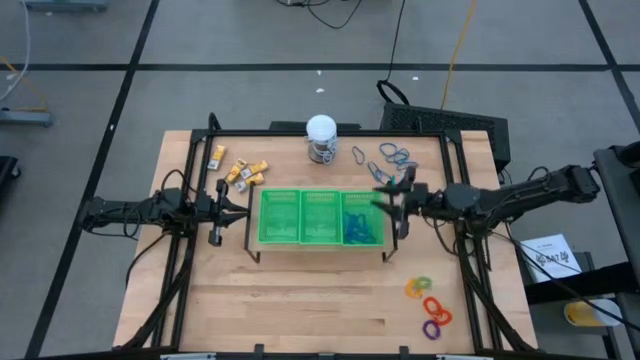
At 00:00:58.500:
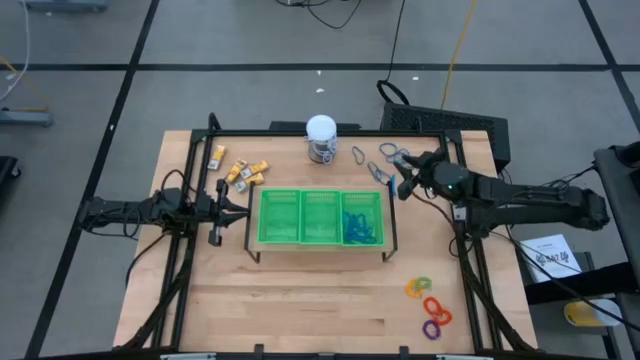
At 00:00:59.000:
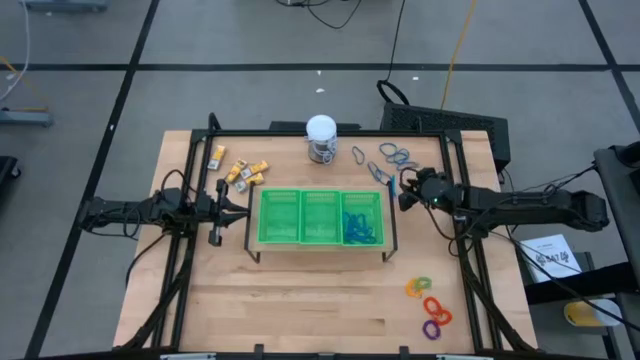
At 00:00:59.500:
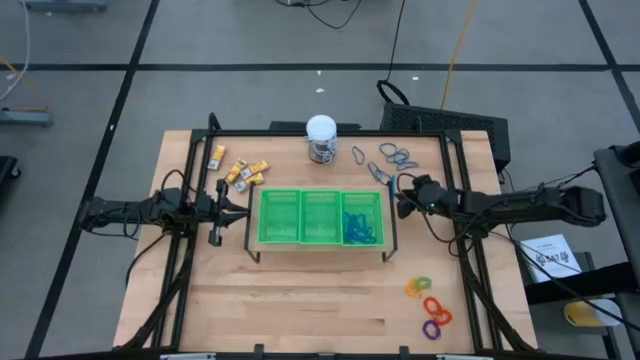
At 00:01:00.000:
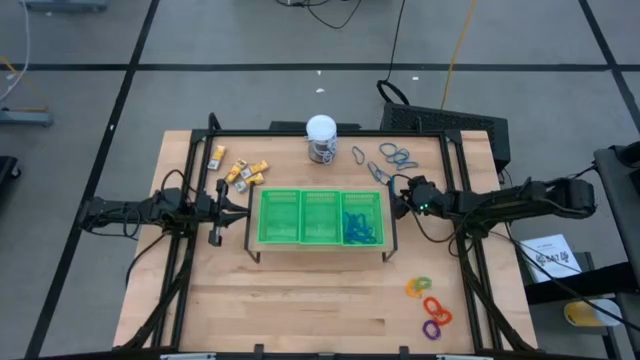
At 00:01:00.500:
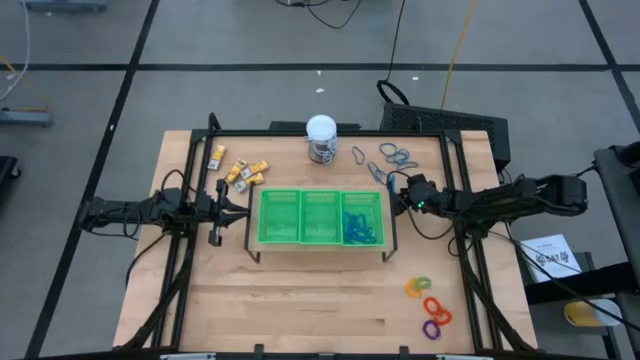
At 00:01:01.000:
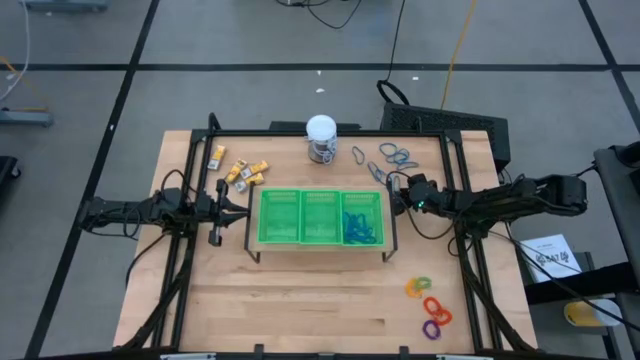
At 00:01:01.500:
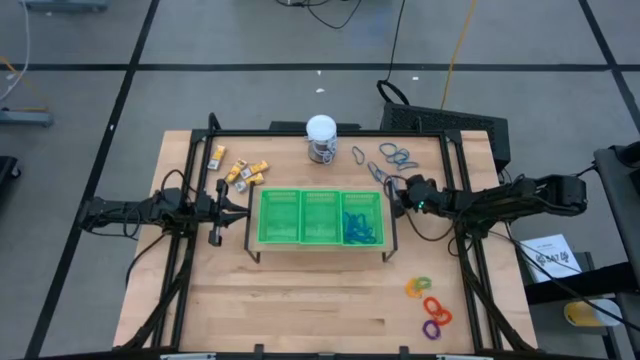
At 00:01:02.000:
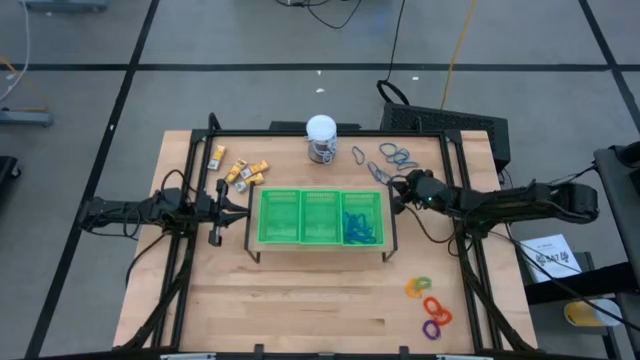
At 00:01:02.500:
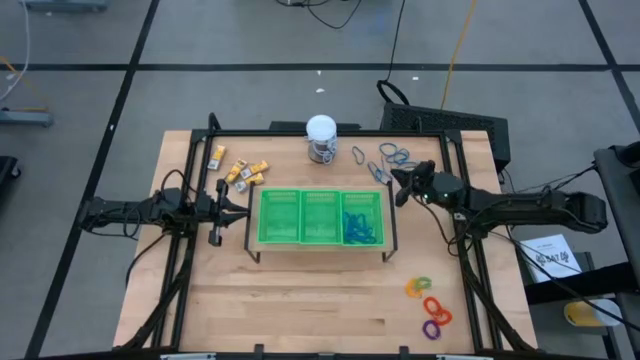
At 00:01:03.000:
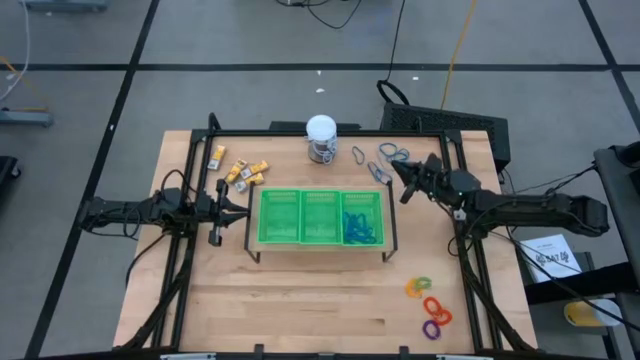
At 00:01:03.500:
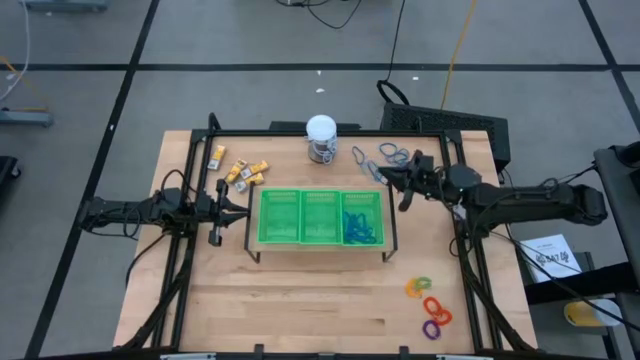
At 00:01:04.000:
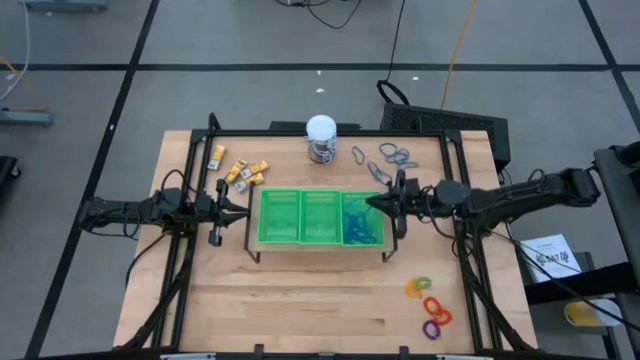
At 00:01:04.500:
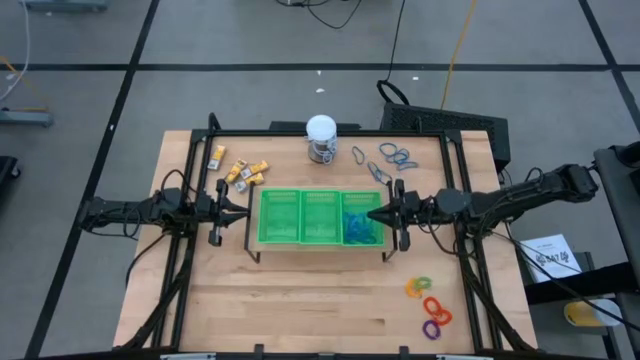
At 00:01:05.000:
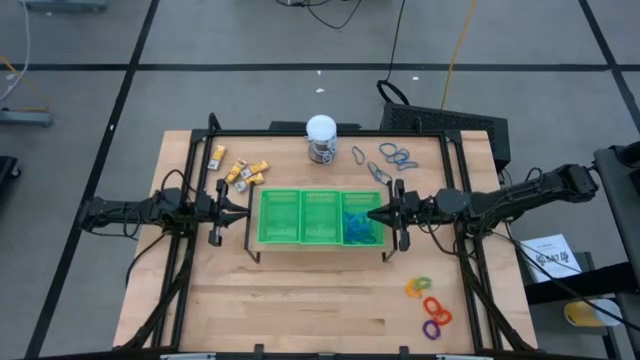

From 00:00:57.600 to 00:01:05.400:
Task: Pick & Place Office Desk Supplies
Put the blue rubber band into the right green bin on the shelf

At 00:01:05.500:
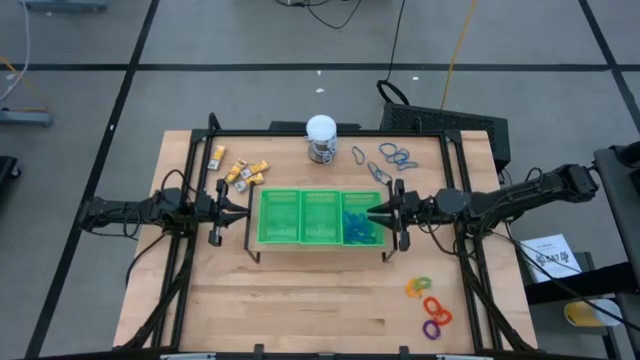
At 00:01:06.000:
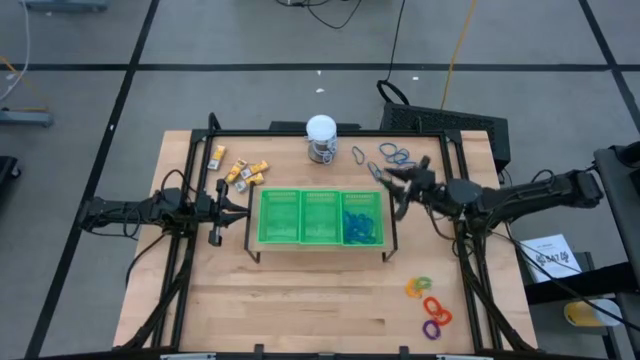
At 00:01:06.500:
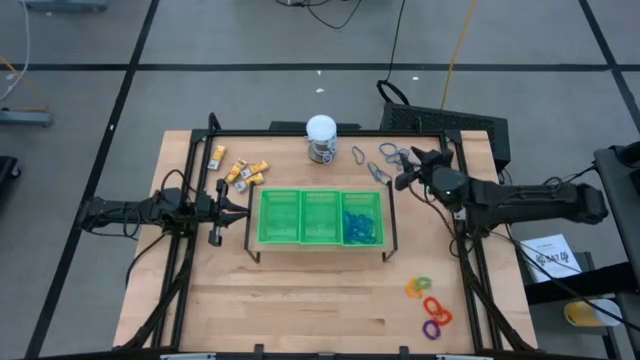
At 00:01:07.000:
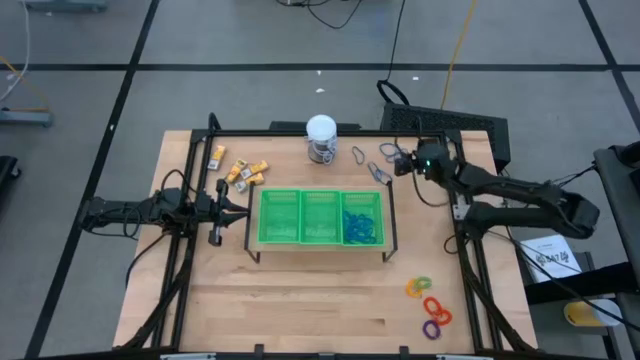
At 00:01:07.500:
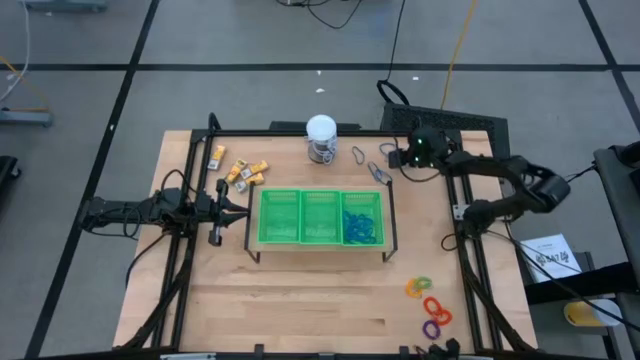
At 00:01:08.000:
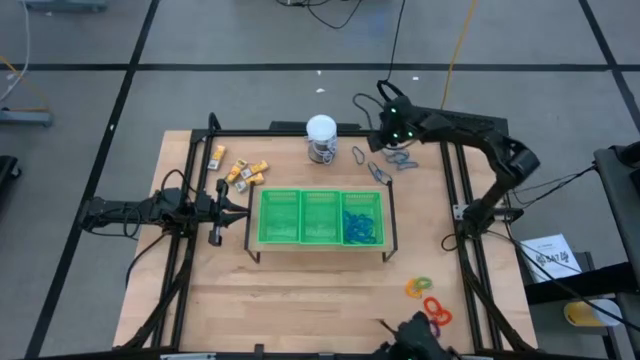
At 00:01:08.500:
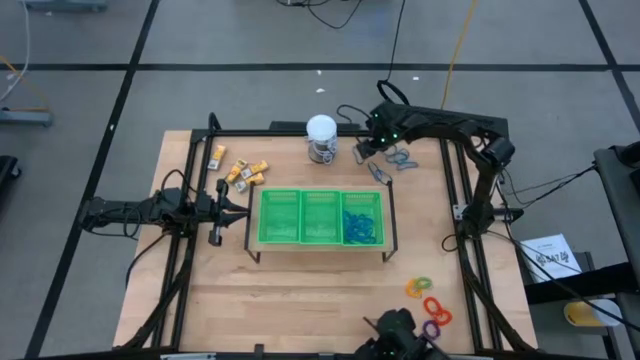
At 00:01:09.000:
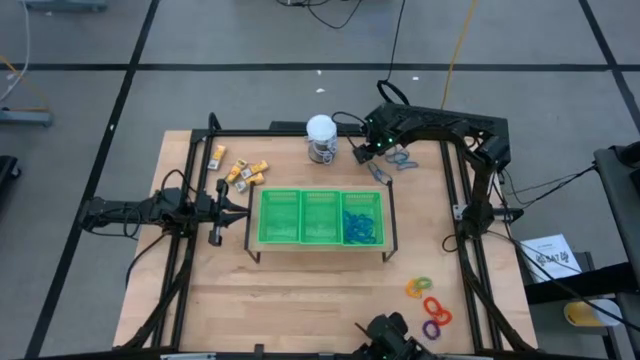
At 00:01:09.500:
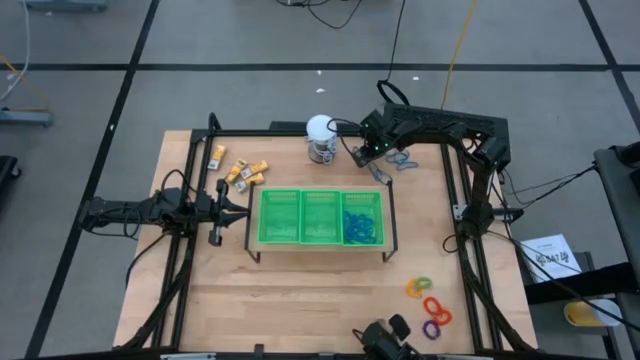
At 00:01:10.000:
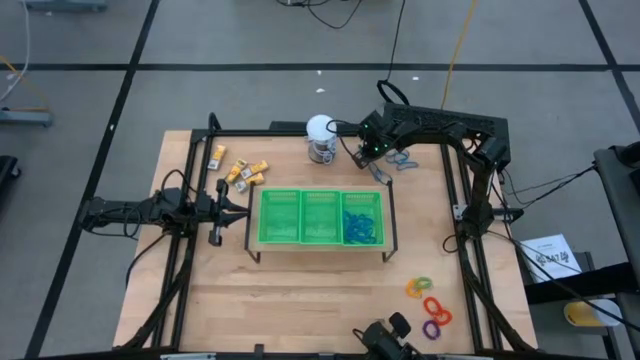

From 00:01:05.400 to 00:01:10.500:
Put the blue rubber band into the right green bin on the shelf

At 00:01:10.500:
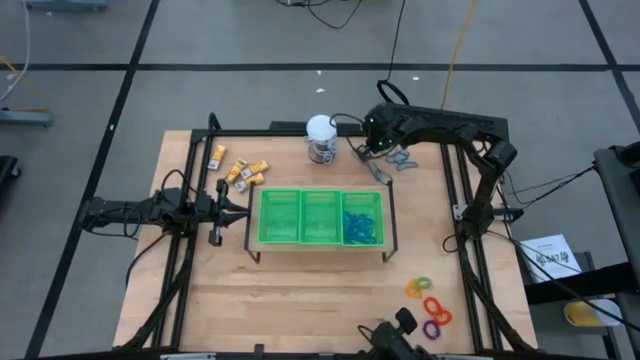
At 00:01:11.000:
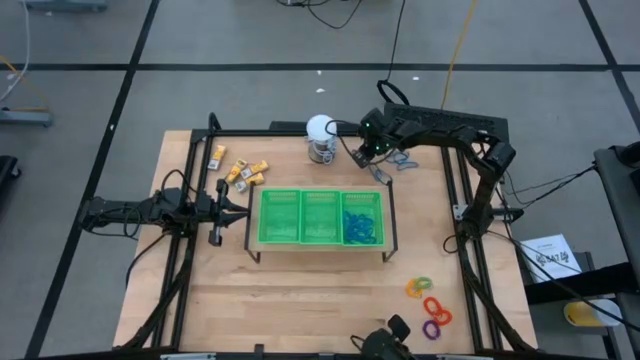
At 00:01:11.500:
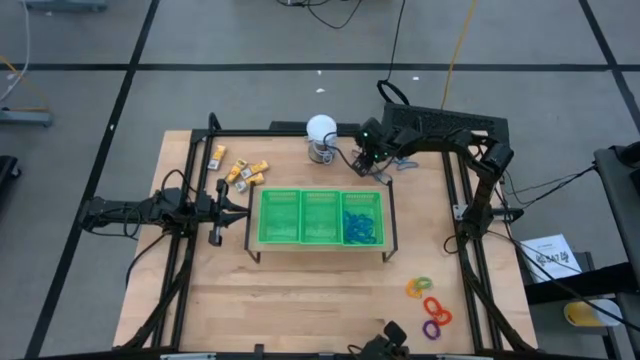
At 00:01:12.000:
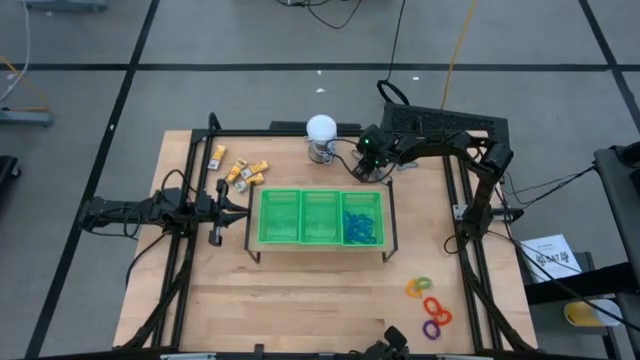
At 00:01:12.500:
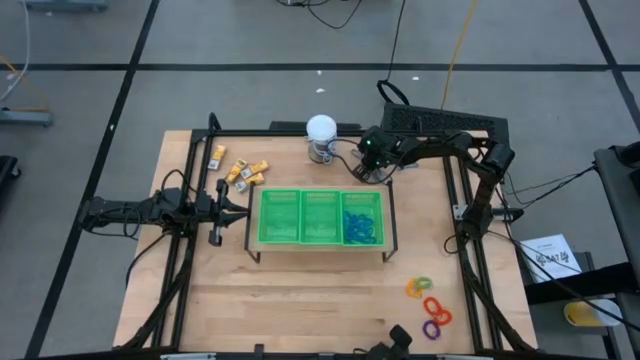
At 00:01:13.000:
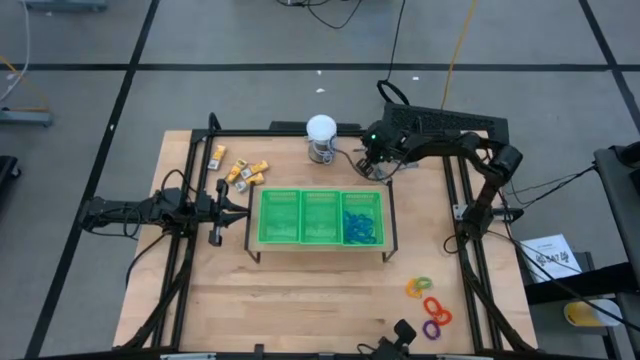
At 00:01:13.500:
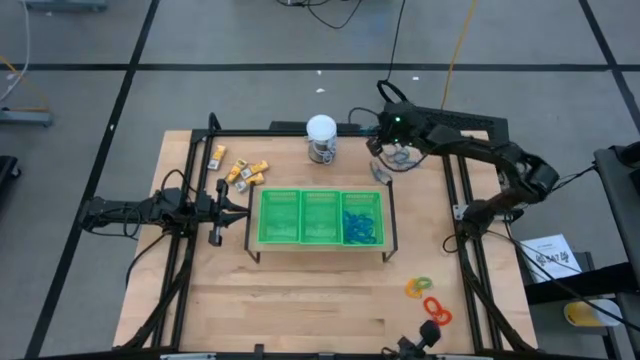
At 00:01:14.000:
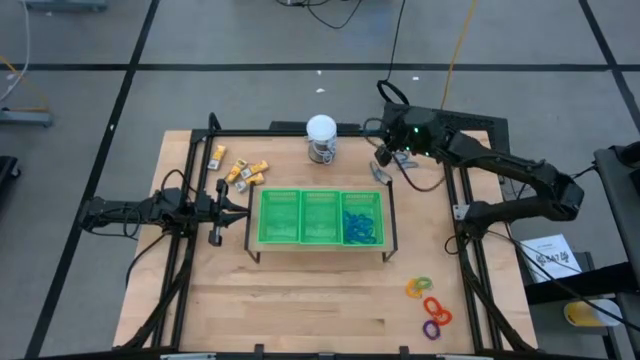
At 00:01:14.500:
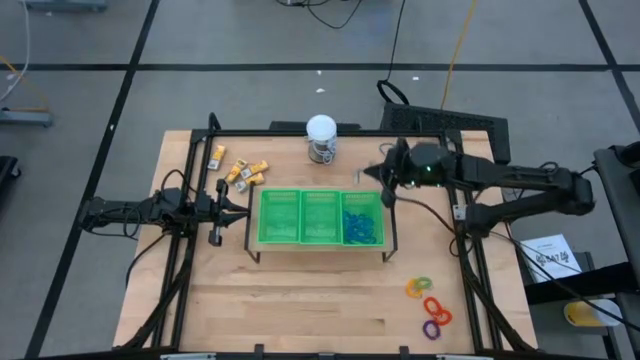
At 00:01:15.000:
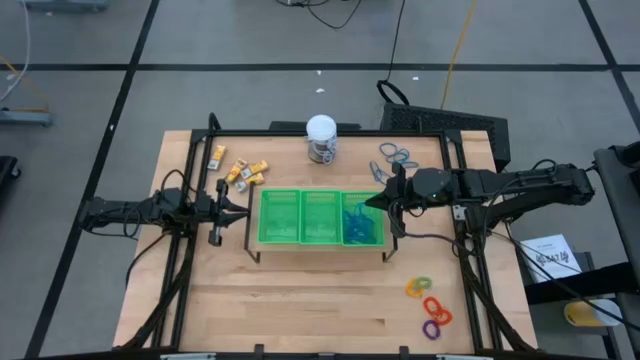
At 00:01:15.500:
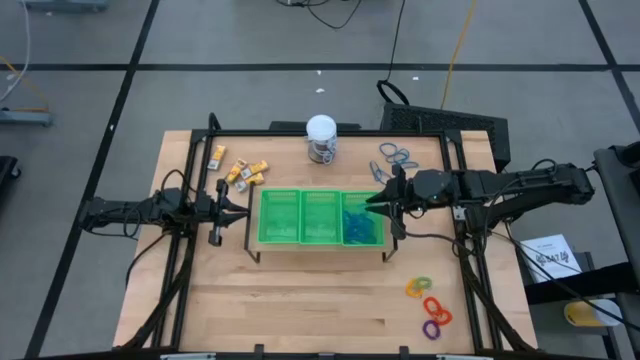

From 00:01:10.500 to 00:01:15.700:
Put the blue rubber band into the right green bin on the shelf

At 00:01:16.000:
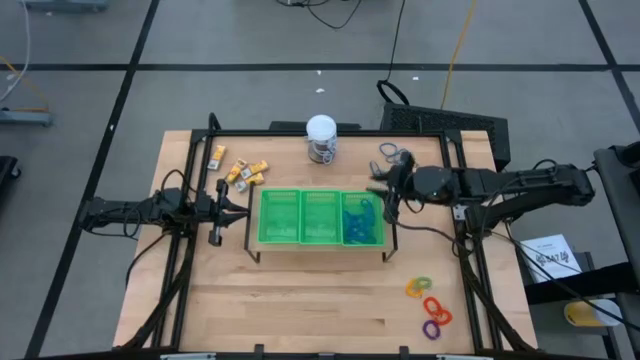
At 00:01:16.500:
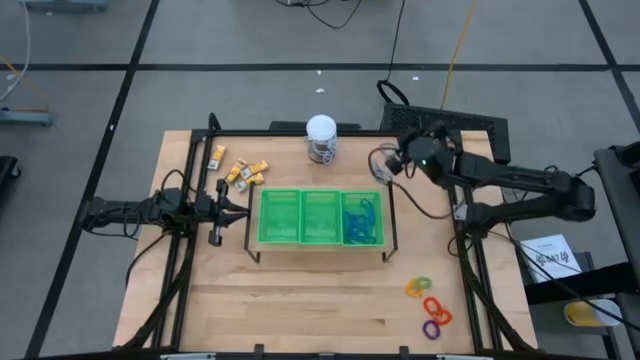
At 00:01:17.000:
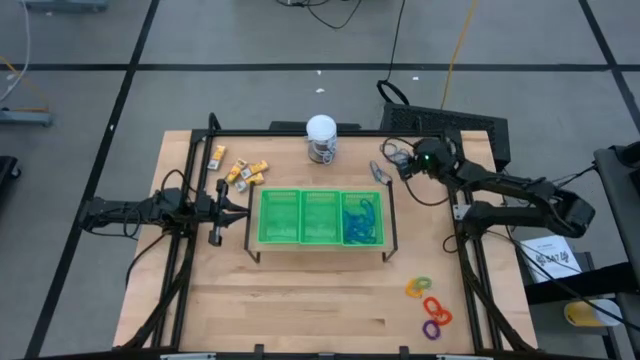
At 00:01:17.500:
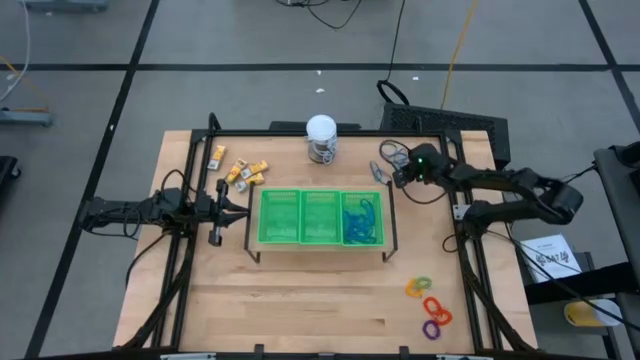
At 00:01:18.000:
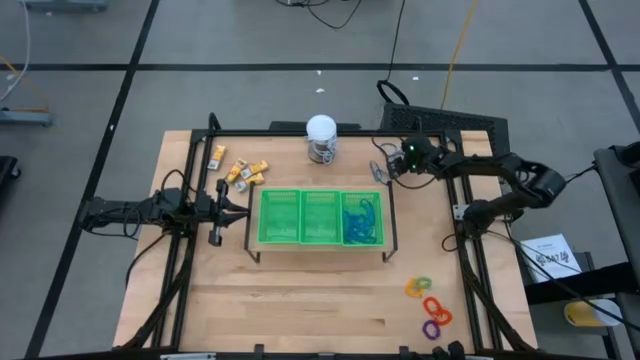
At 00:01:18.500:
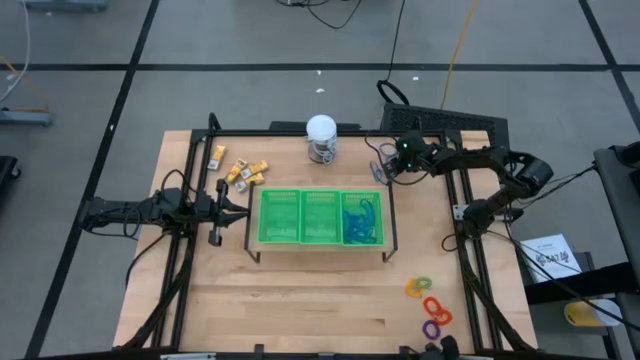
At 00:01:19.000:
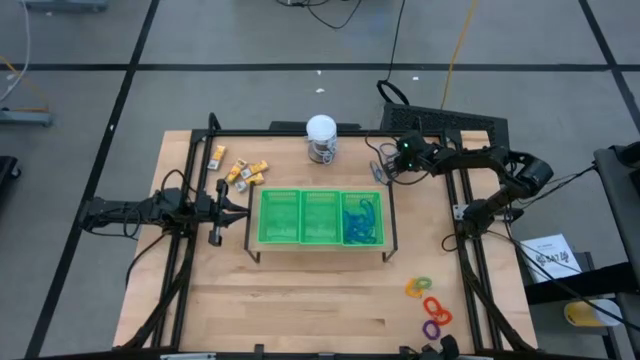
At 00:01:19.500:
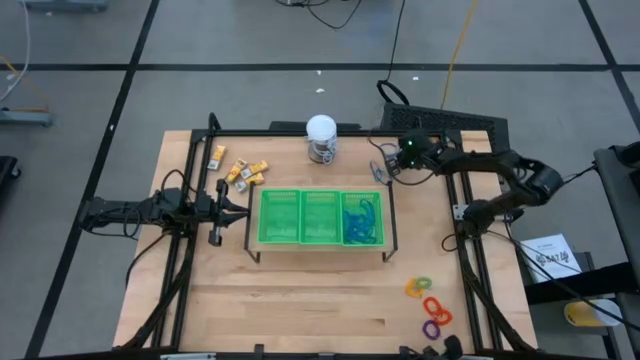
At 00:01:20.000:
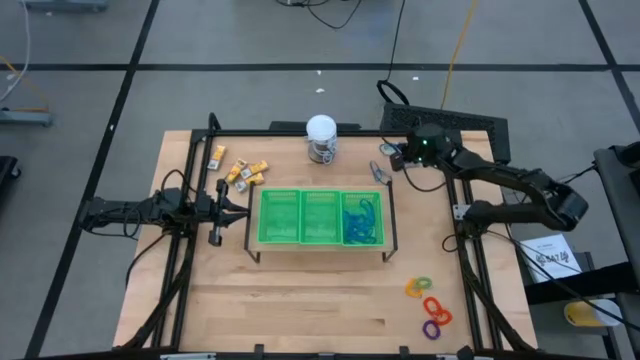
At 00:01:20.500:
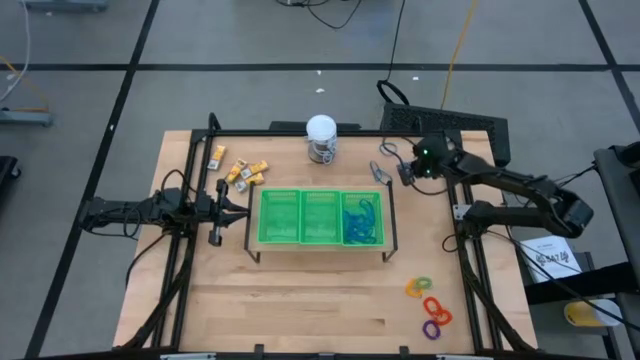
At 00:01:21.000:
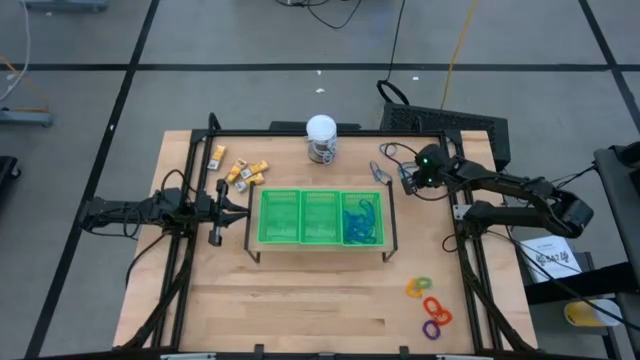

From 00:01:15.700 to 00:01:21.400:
Put the blue rubber band into the right green bin on the shelf
